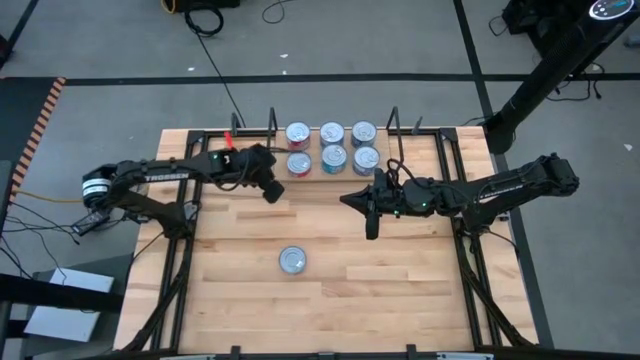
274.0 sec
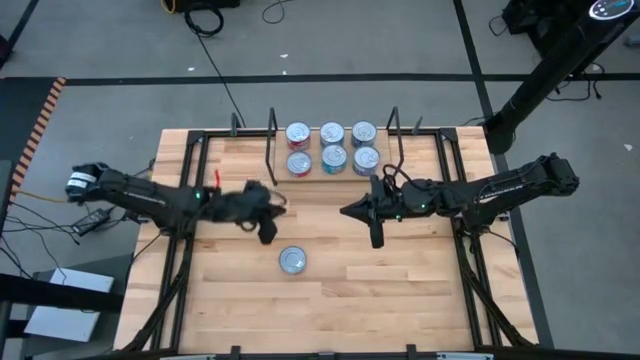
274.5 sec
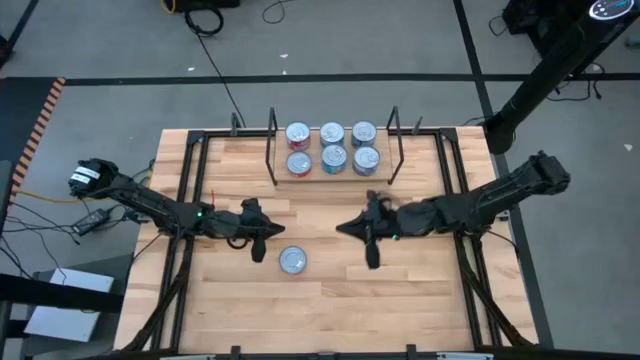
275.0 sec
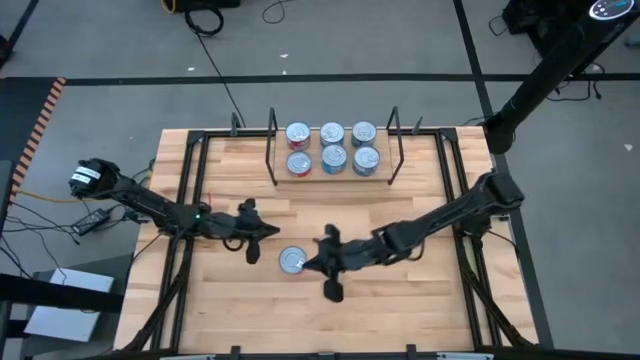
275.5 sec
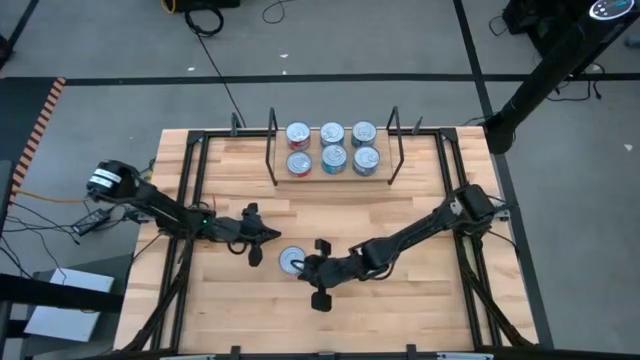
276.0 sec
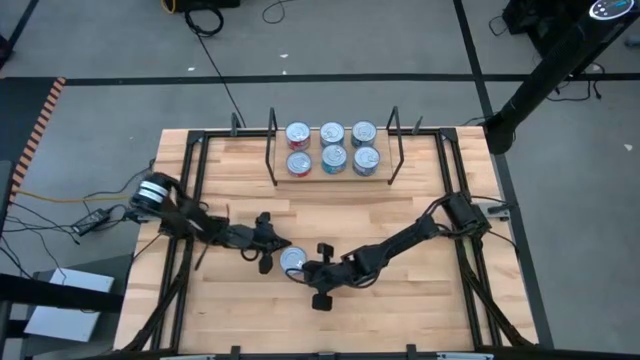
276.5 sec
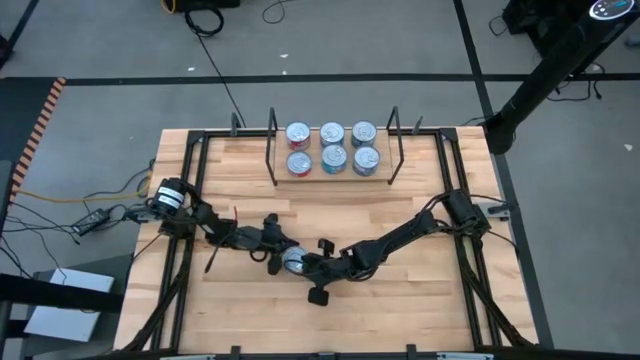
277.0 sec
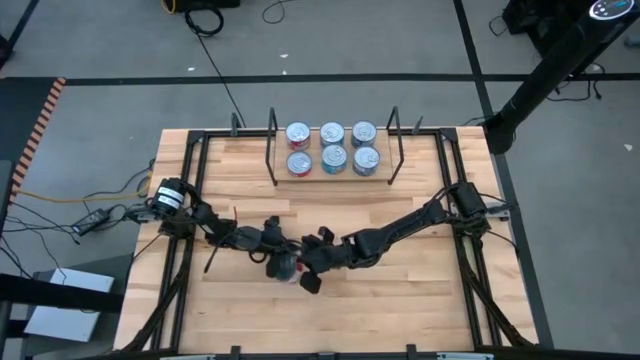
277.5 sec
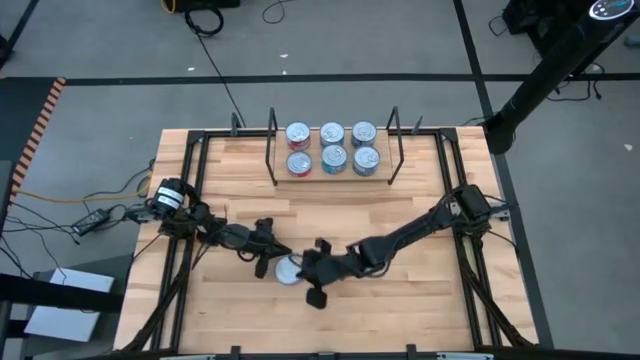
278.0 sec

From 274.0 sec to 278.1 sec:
Task: Stack canned seafood by type on shelf
Stack the red tuna can on top of the other red tuna can

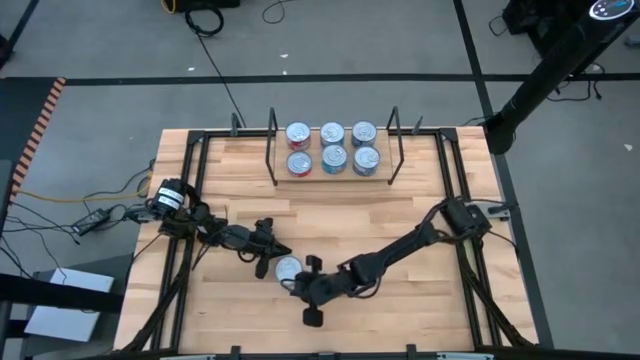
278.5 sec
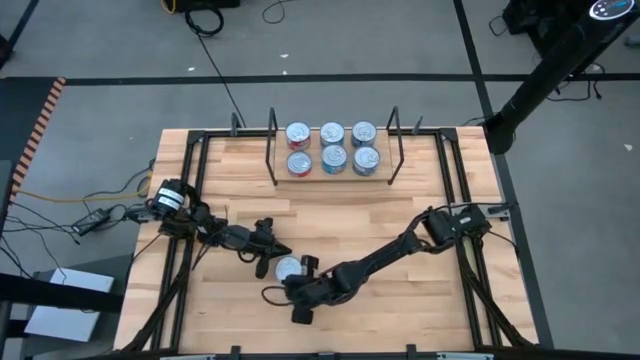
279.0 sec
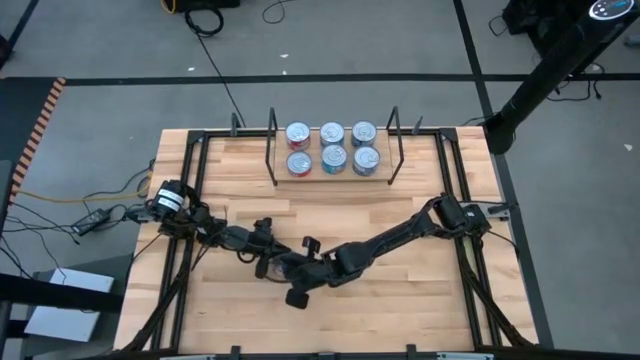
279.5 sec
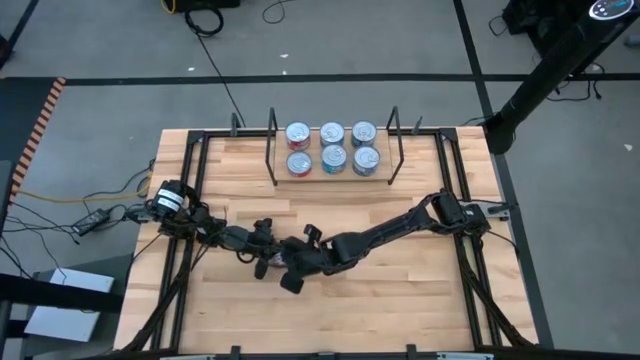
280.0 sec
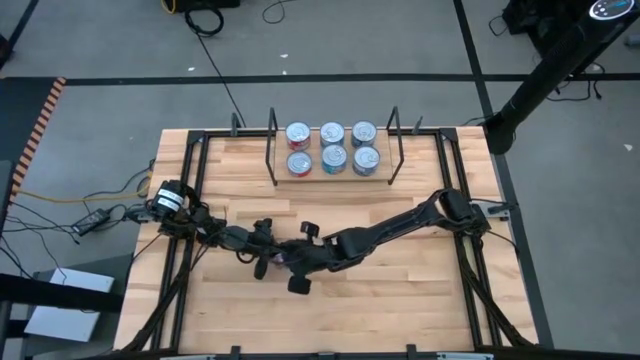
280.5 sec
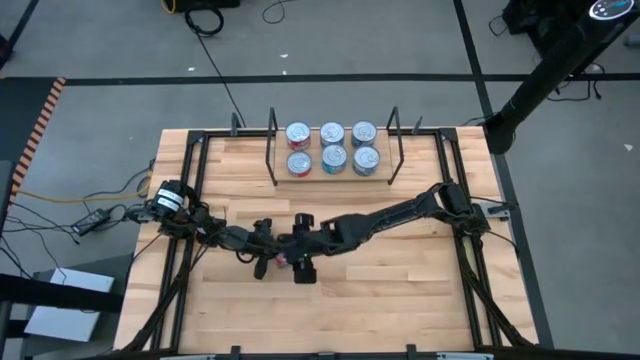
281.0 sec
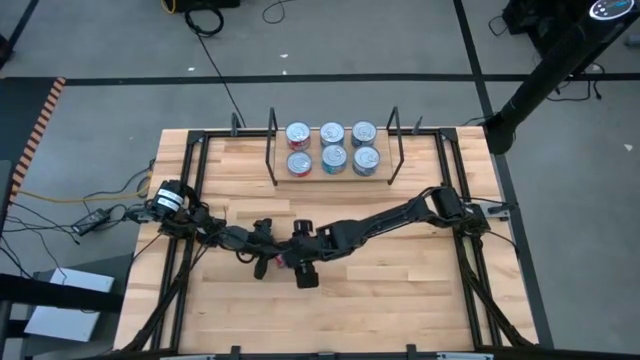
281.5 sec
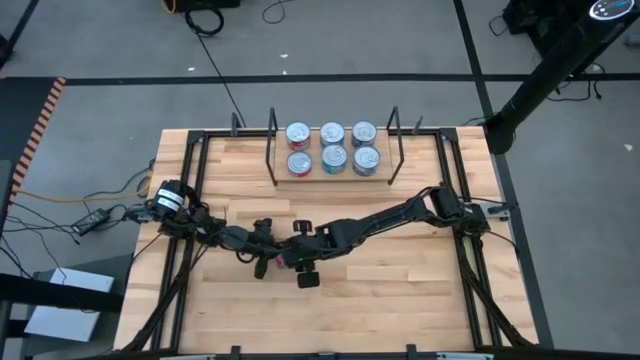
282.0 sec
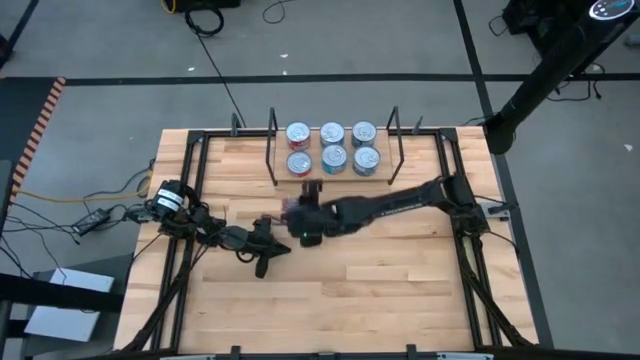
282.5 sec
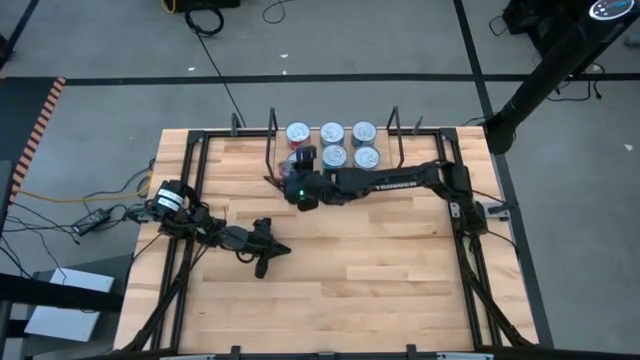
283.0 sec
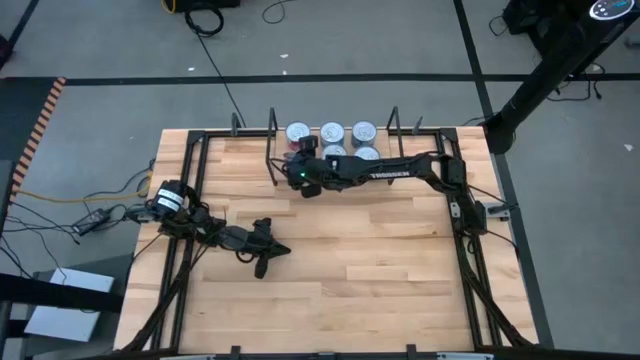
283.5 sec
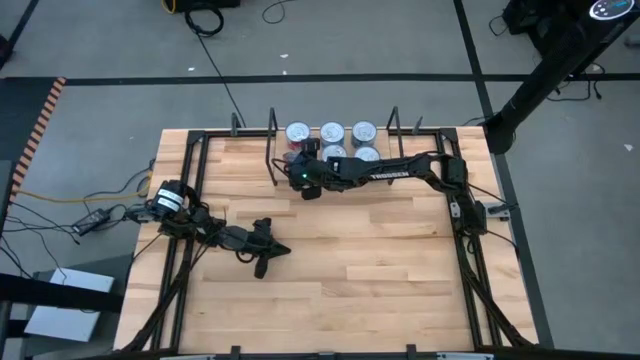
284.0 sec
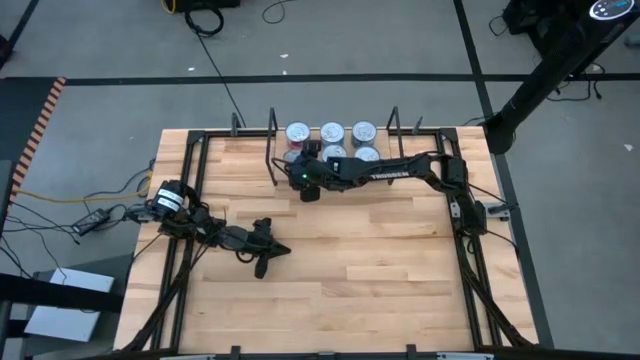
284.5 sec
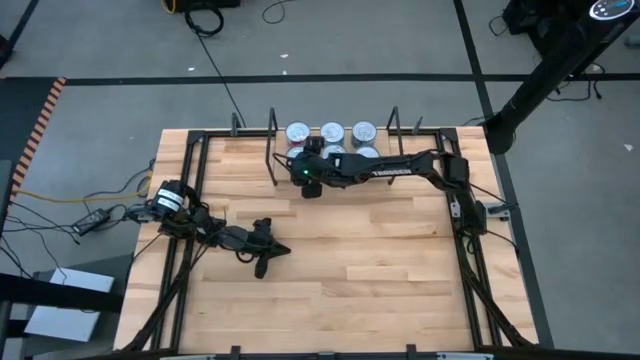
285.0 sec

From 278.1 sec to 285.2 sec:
Stack the red tuna can on top of the other red tuna can

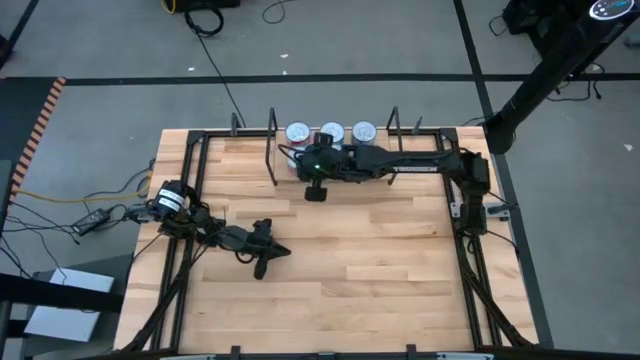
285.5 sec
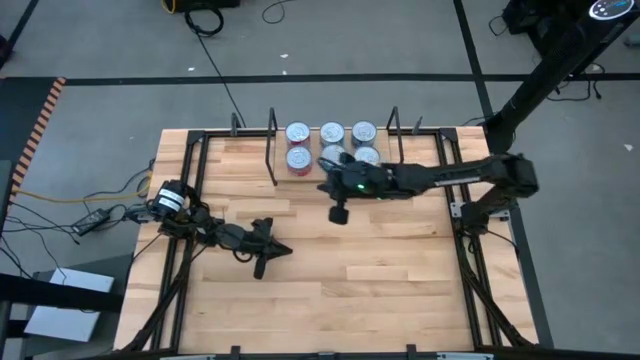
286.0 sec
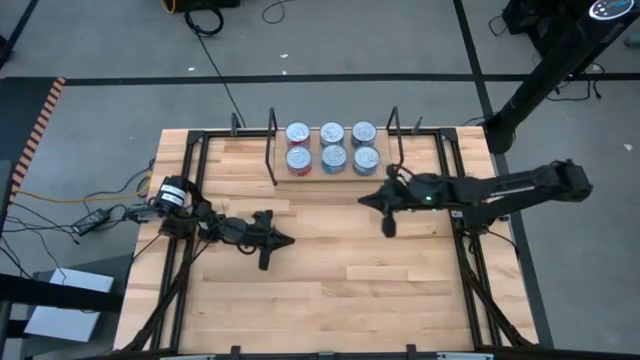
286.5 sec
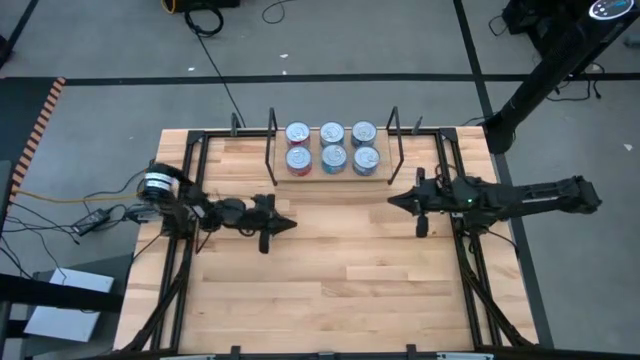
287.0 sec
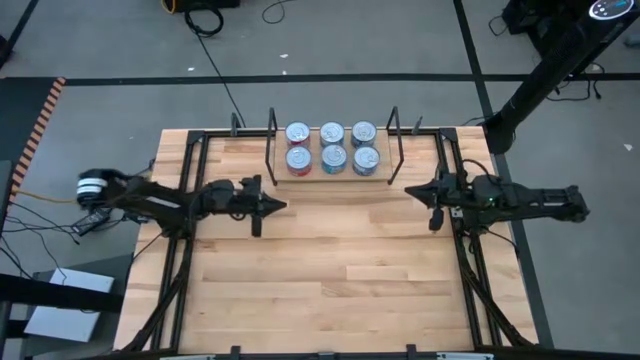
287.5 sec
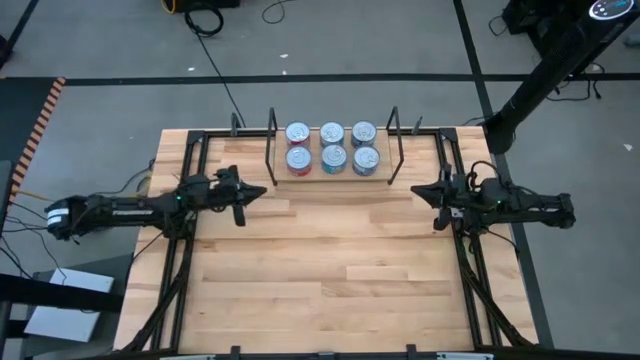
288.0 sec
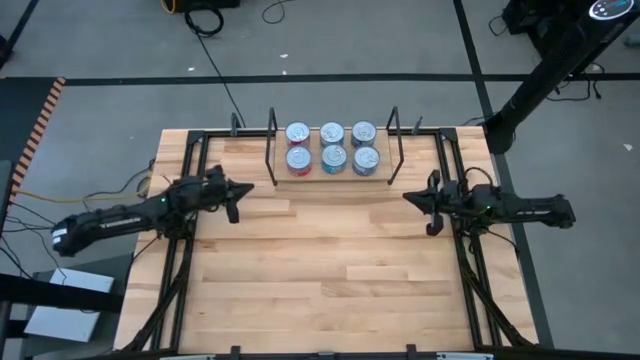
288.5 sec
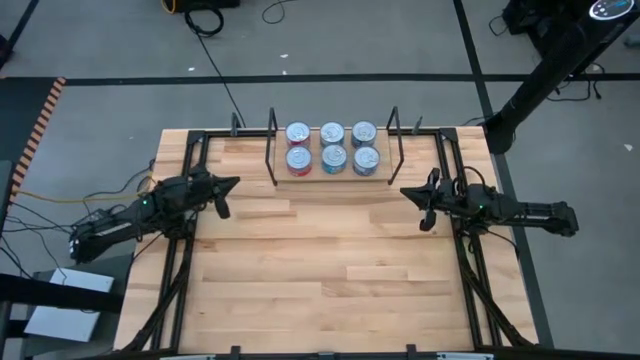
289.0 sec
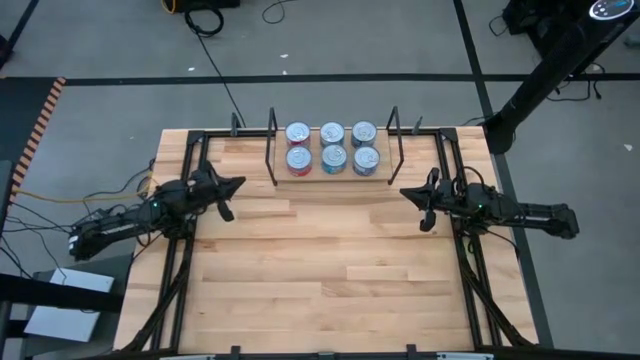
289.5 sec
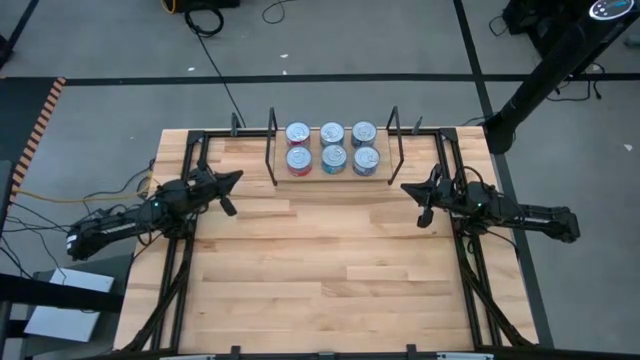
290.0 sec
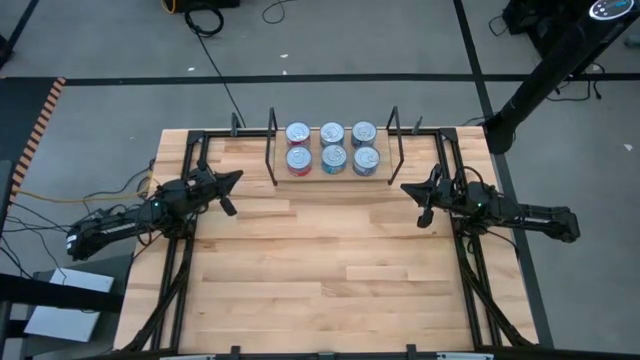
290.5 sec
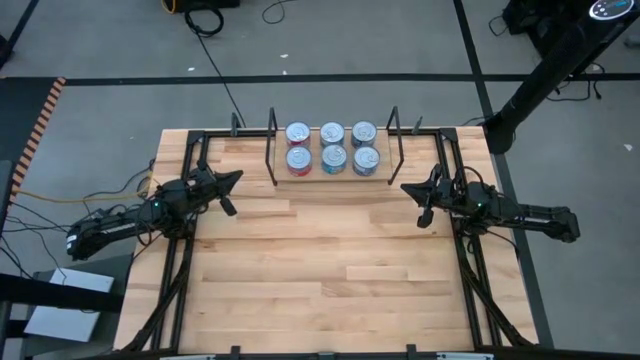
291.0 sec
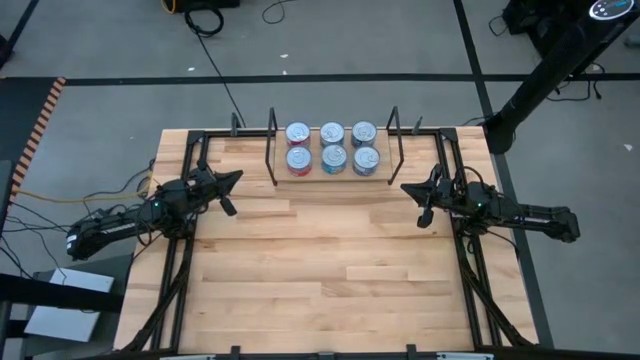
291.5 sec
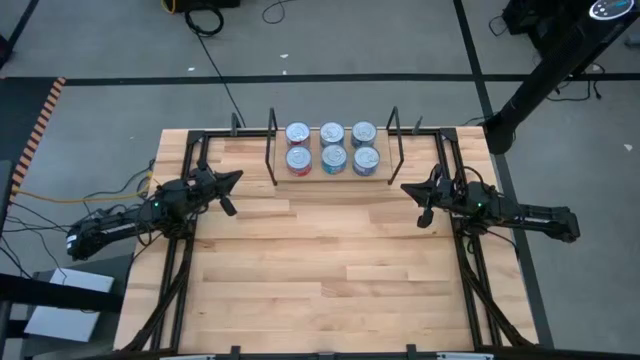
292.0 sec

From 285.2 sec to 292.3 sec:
Return to Home Position

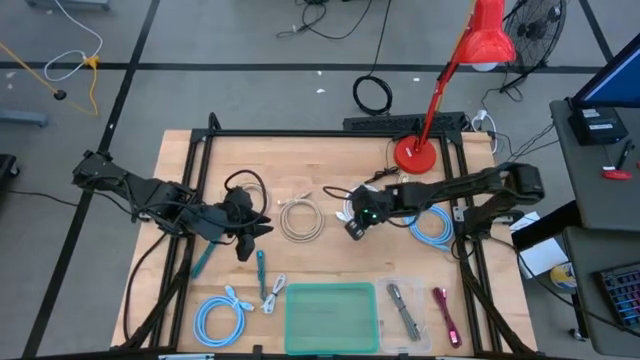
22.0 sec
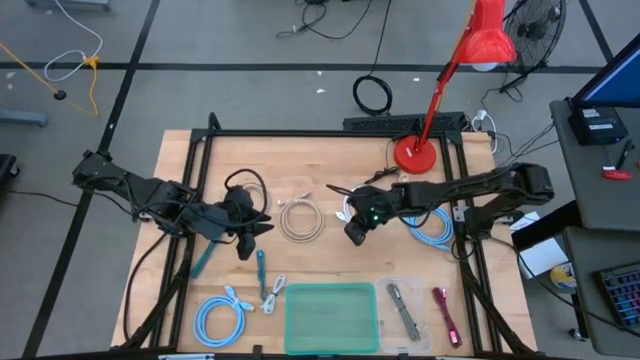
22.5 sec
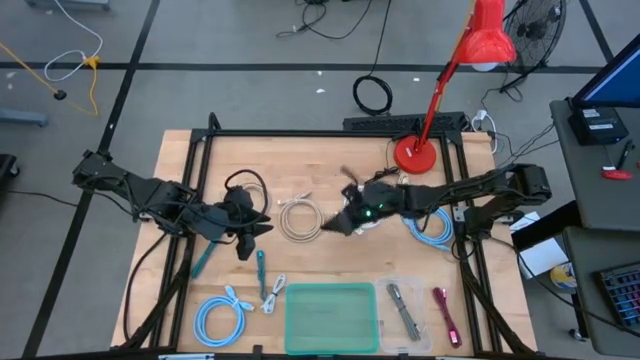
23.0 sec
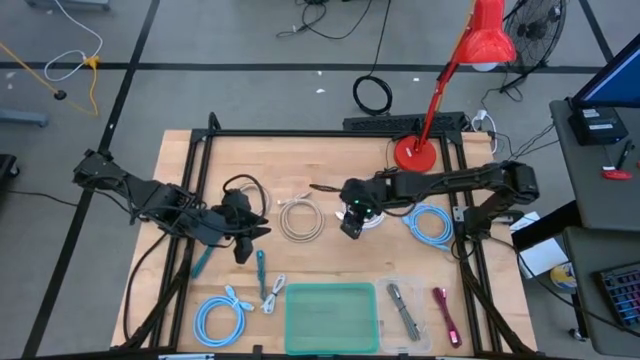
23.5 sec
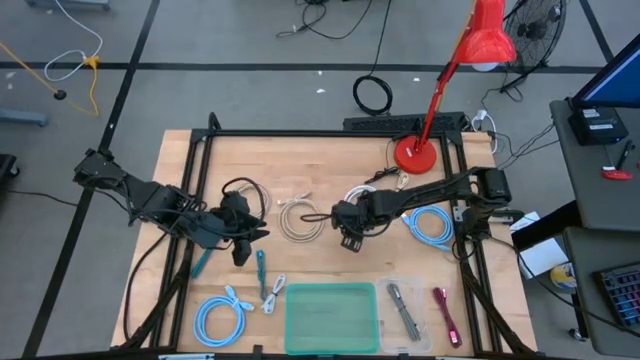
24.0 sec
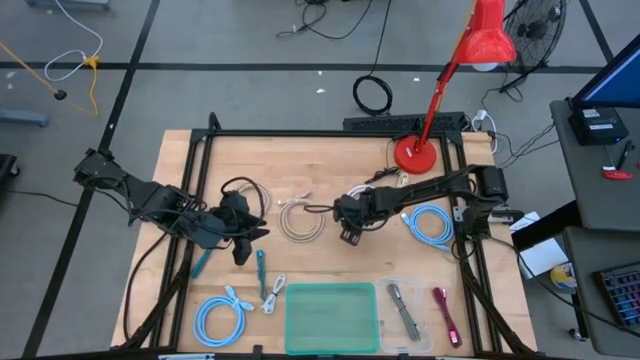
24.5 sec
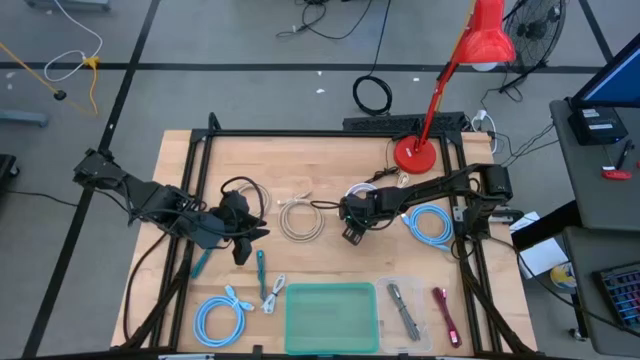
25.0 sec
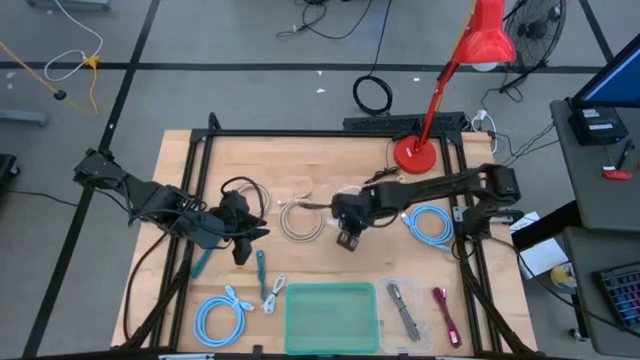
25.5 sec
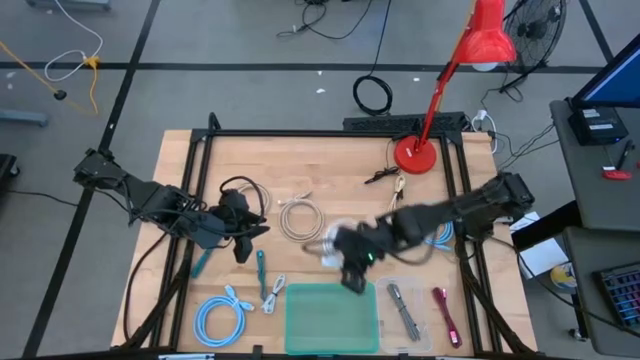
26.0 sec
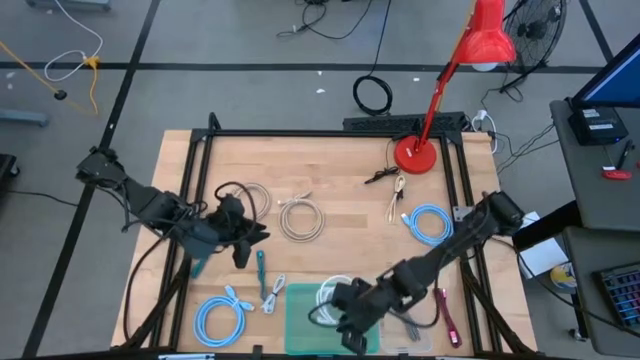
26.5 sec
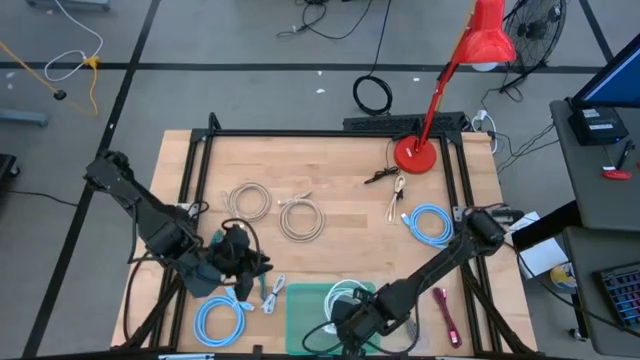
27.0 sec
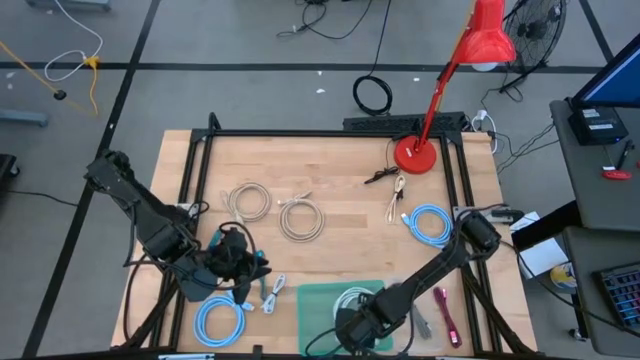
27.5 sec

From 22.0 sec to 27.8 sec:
Task: Pick & Place USB Port
Put the white transparent hdmi cable into the green bin
